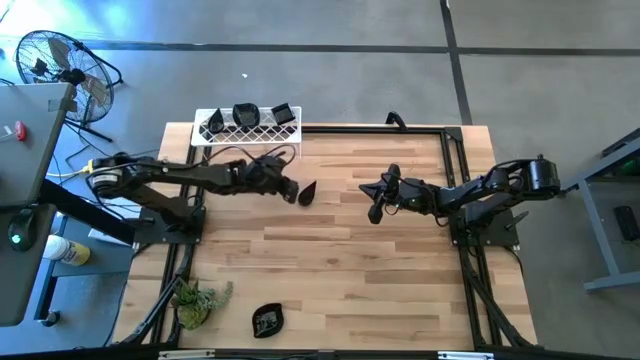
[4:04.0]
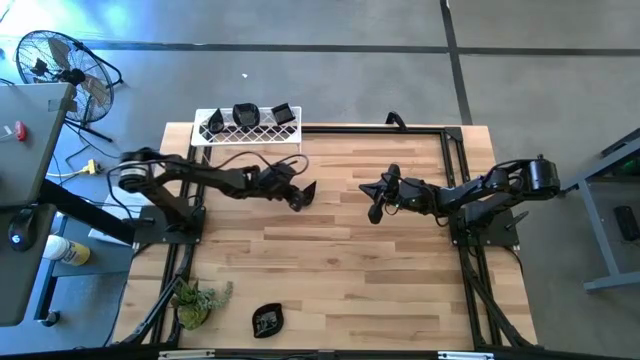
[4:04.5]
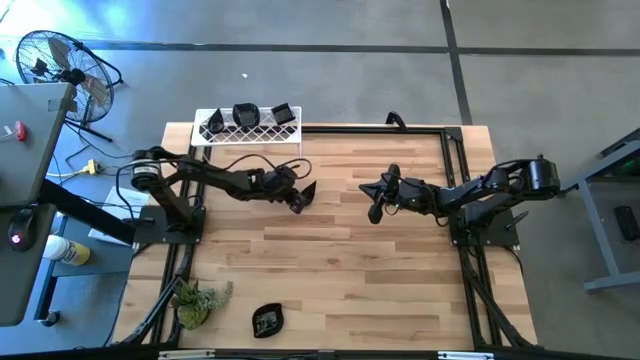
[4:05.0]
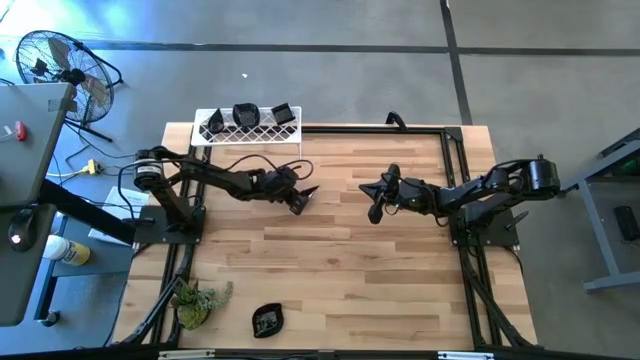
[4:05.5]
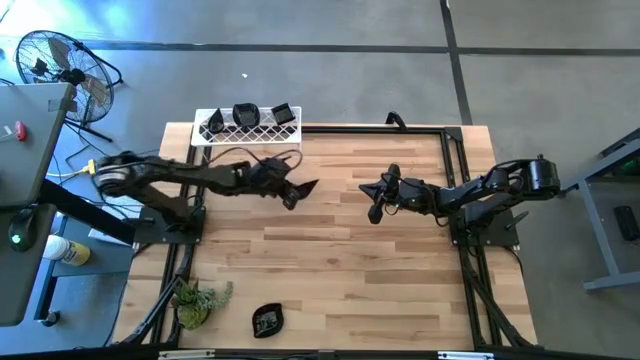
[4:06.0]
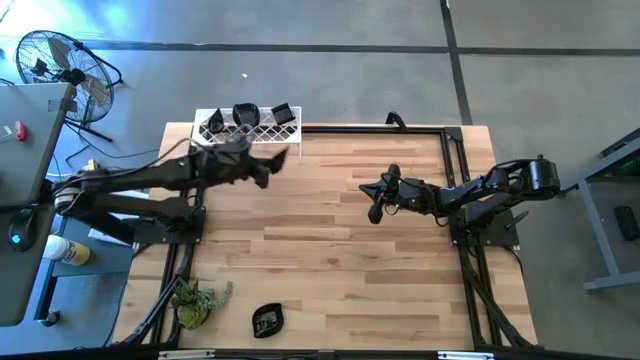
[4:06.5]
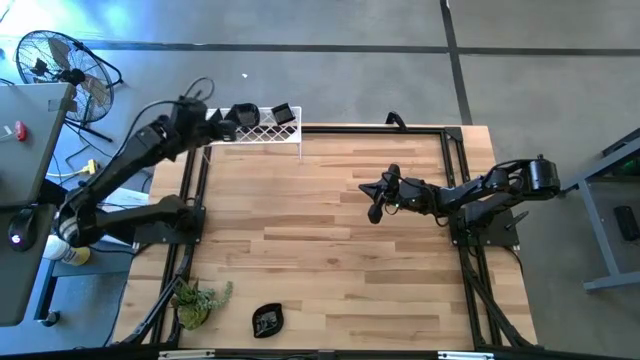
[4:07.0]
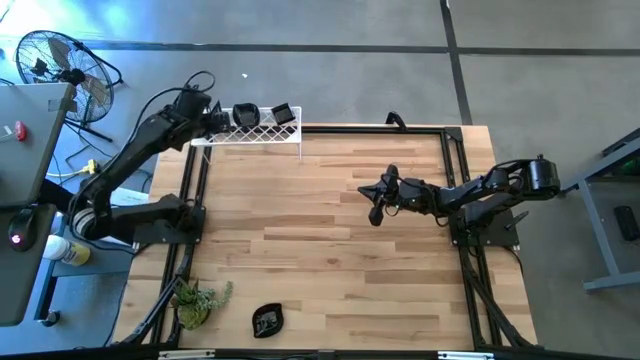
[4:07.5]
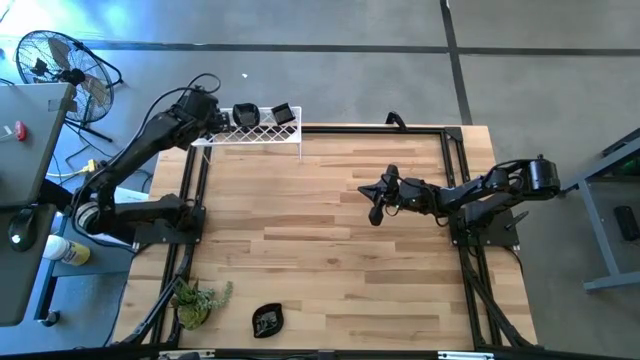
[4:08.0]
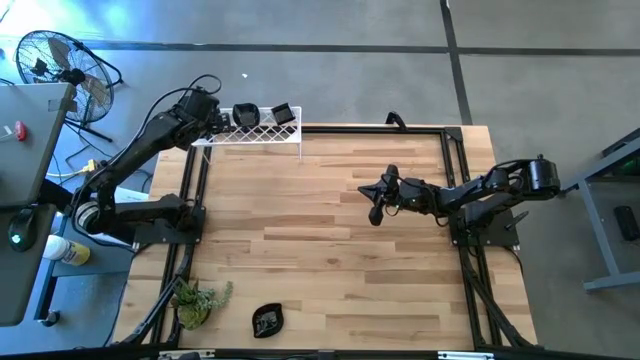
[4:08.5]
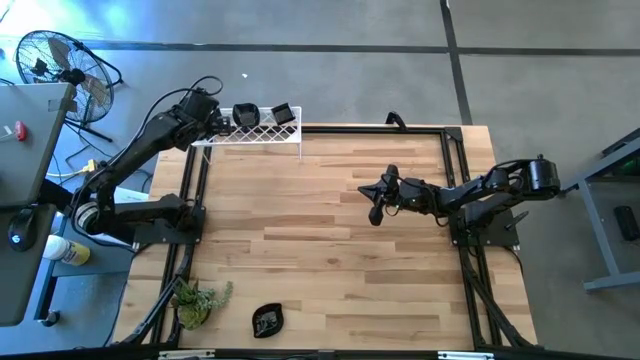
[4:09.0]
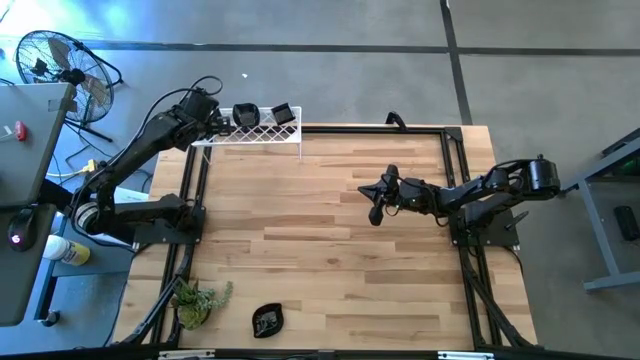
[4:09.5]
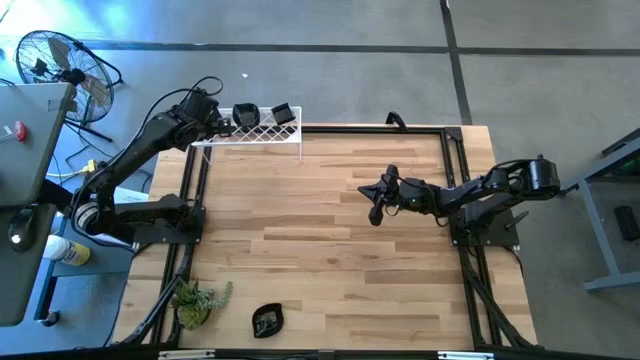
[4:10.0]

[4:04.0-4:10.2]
Task: Pick & Place Mini shaped plates
Stack the drop-shaped plate on top of the drop-shaped plates on the shelf

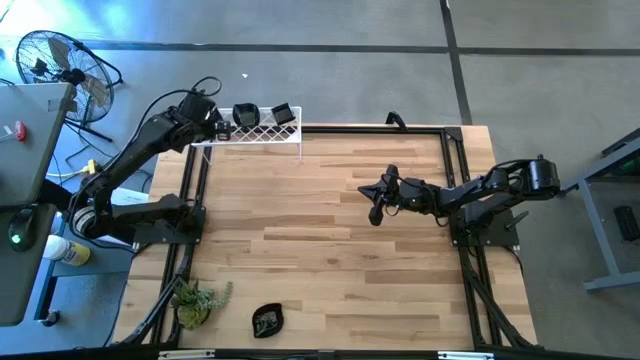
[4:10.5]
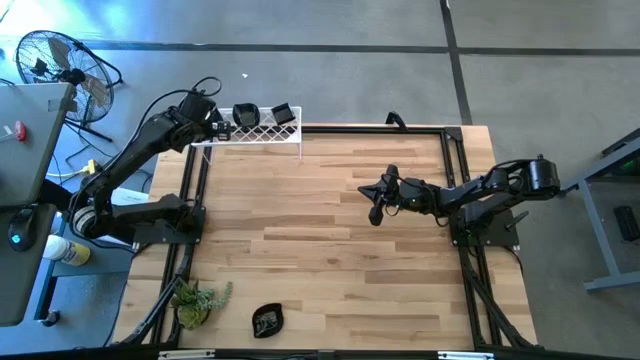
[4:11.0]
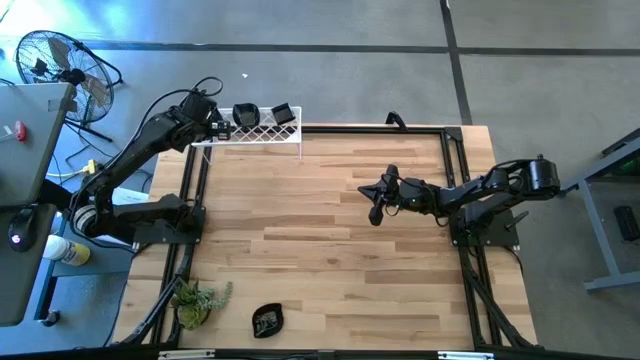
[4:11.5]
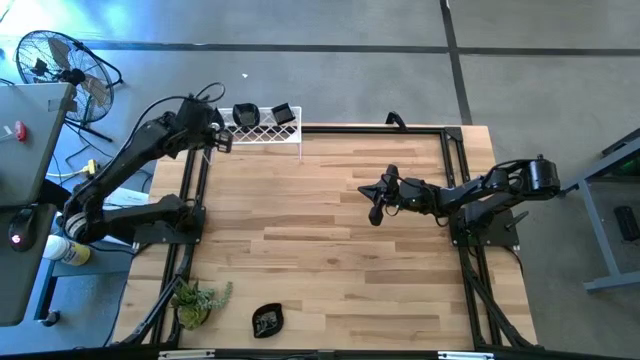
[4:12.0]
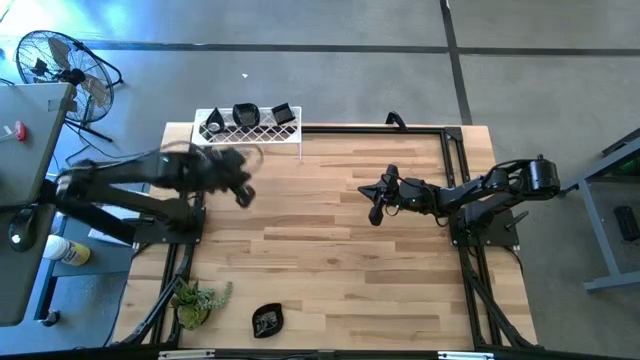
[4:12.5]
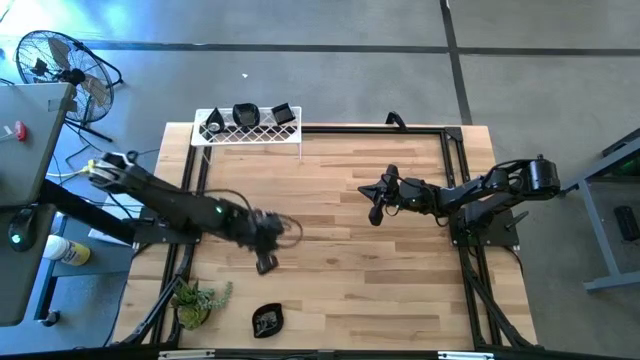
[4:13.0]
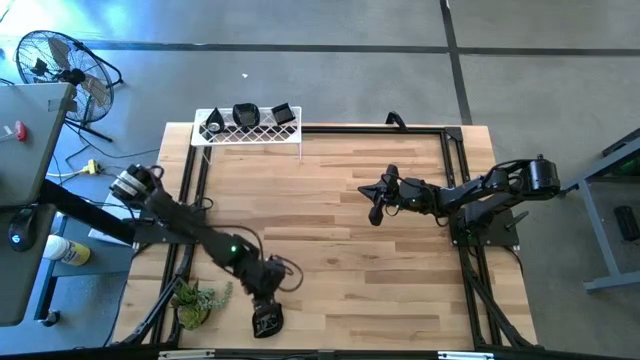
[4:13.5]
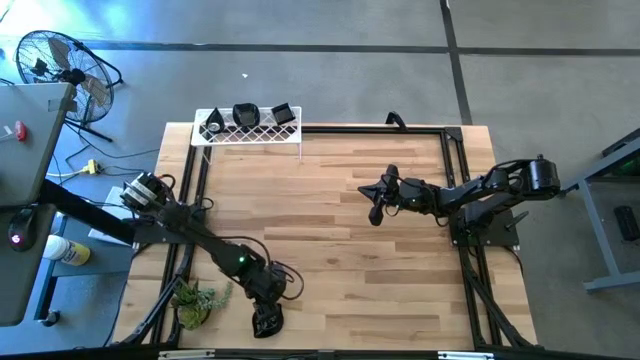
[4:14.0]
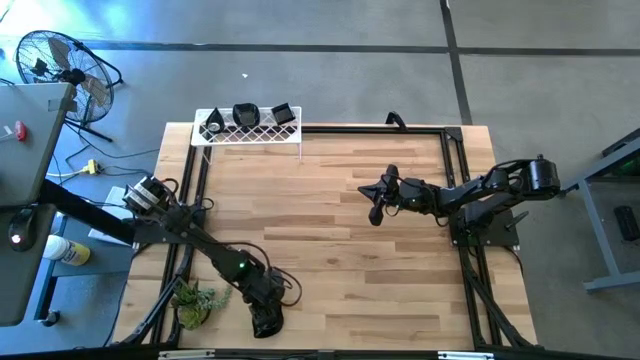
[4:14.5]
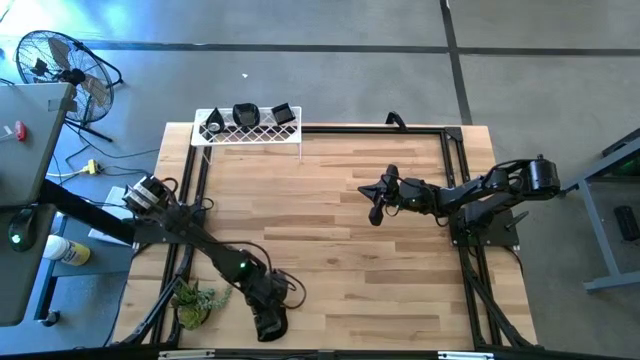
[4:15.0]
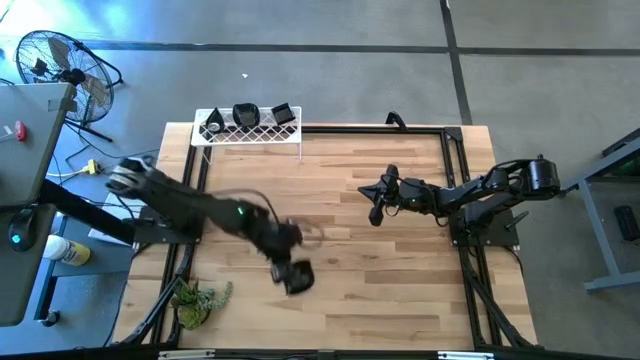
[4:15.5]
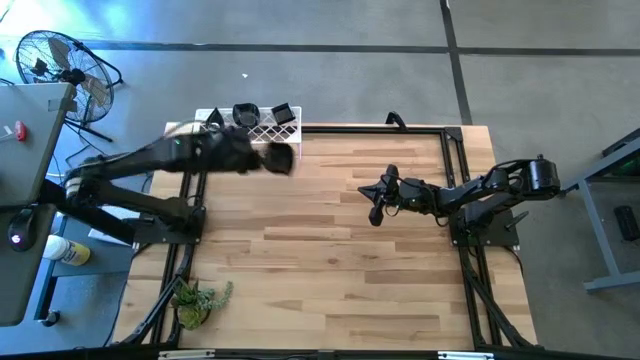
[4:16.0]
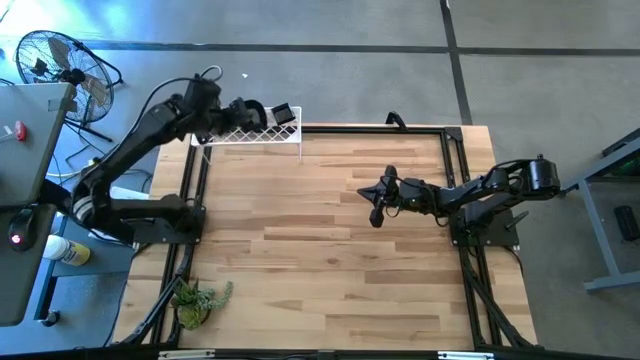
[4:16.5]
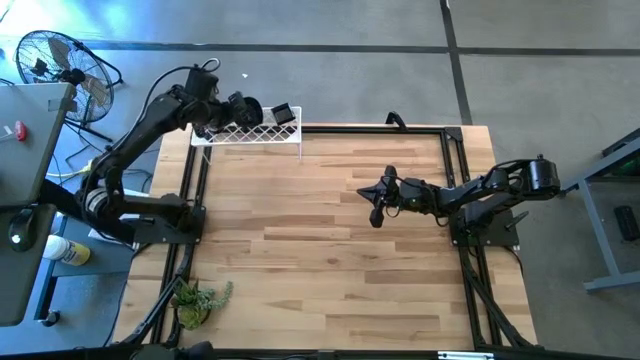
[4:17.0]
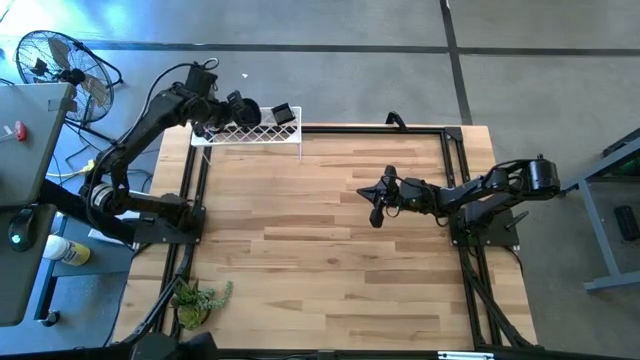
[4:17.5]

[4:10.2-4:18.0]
Stack the leaf-shaped plate on top of the leaf-shaped plates on the shelf

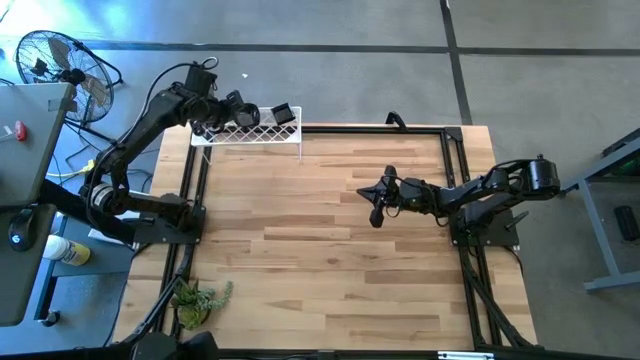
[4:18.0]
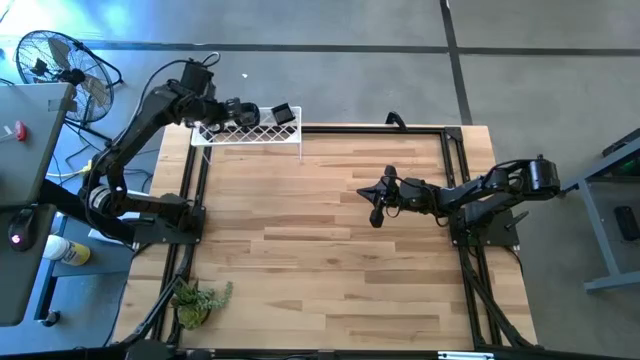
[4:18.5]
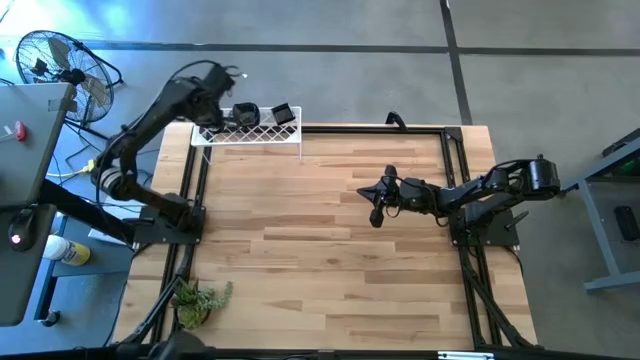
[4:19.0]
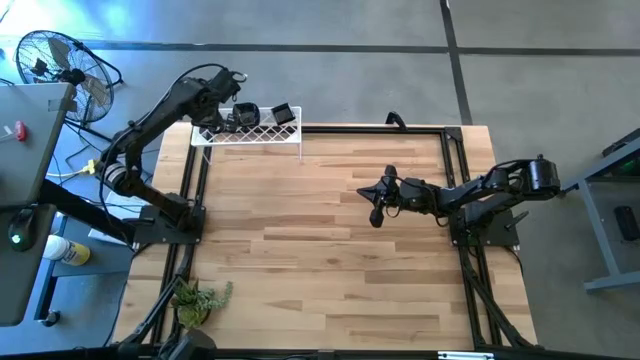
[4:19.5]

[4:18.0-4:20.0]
Adjust the stacked drop-shaped plates

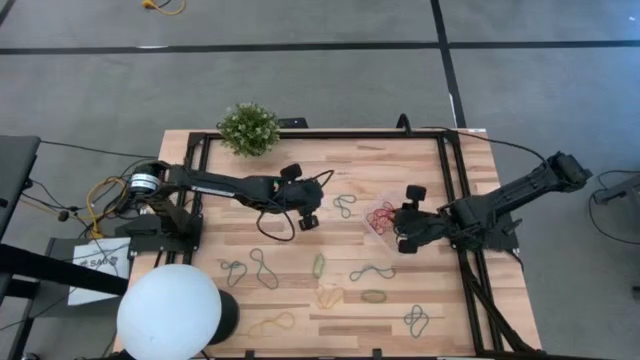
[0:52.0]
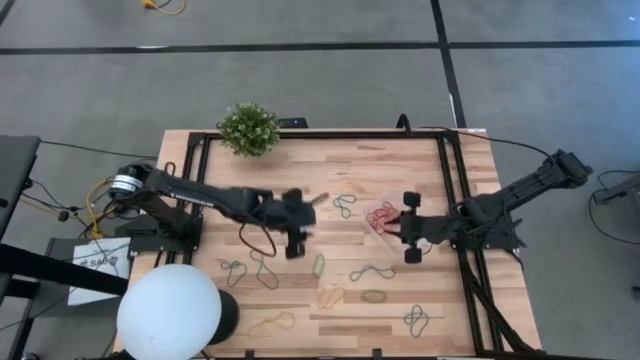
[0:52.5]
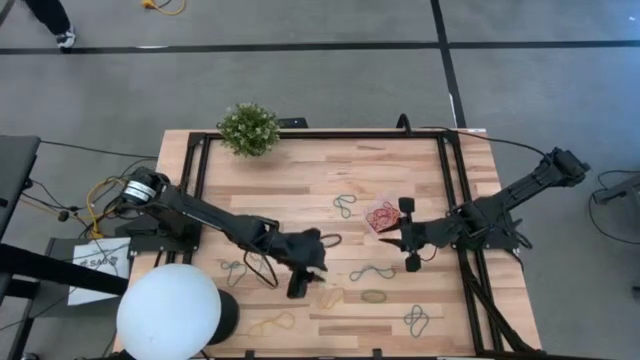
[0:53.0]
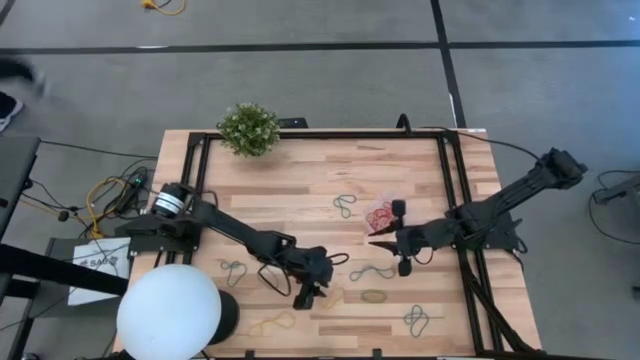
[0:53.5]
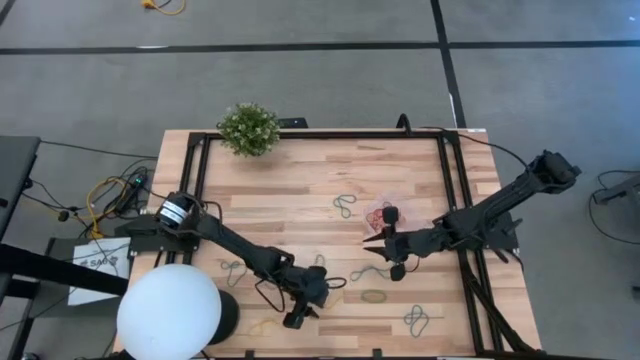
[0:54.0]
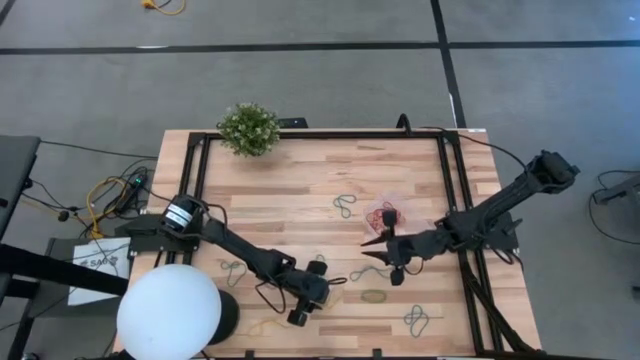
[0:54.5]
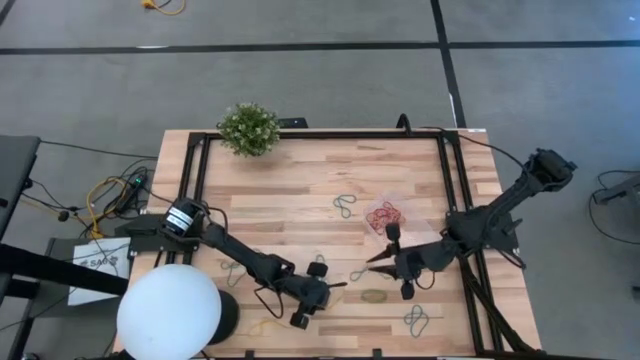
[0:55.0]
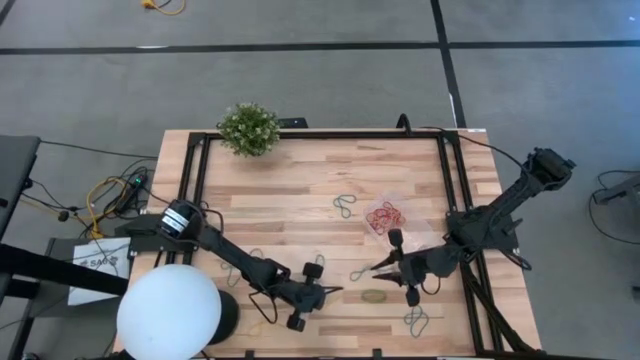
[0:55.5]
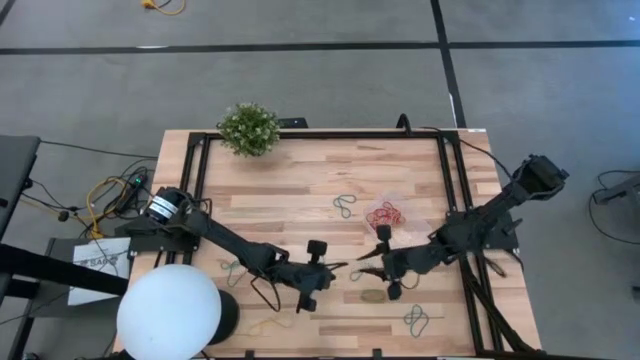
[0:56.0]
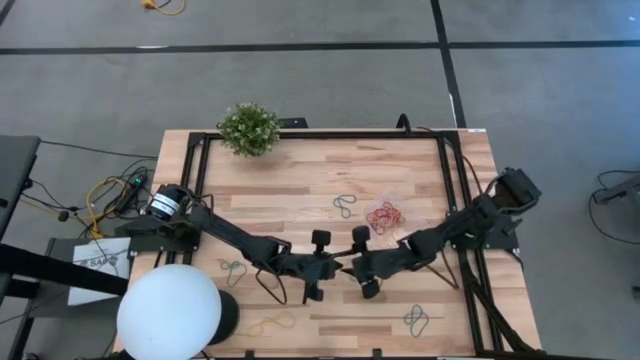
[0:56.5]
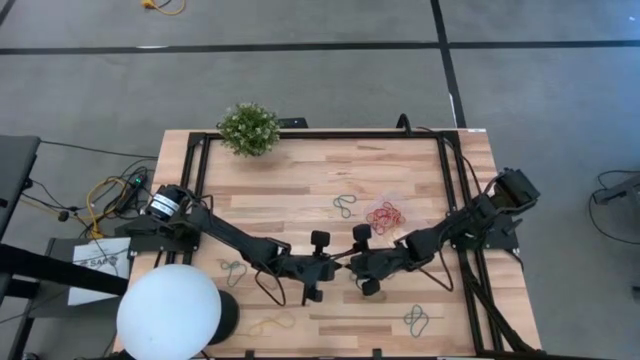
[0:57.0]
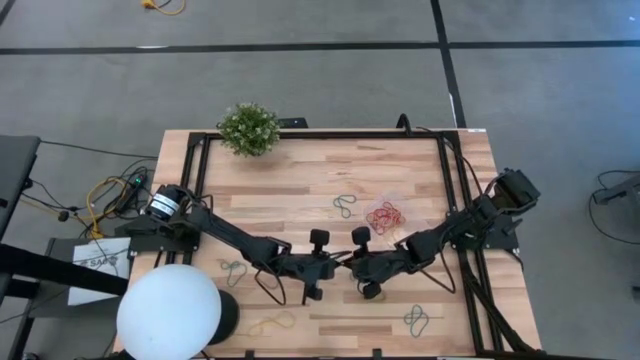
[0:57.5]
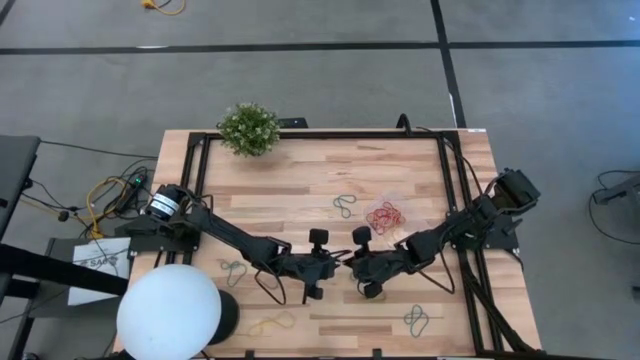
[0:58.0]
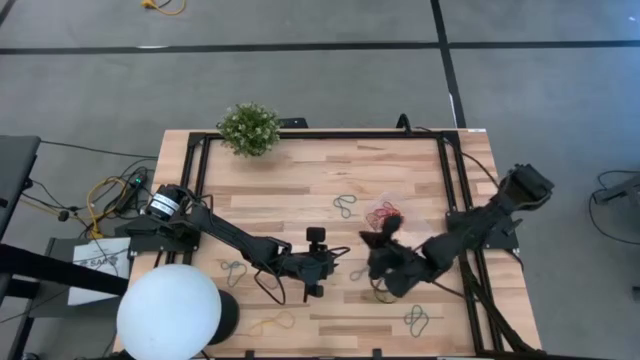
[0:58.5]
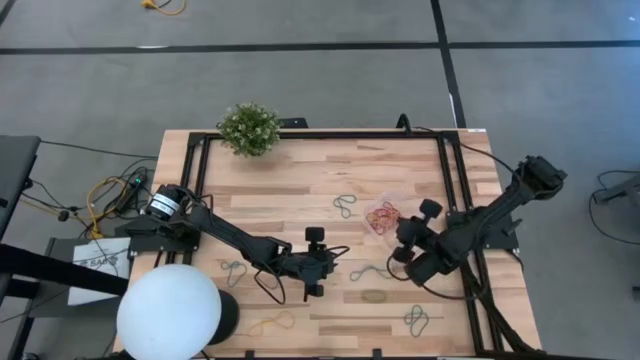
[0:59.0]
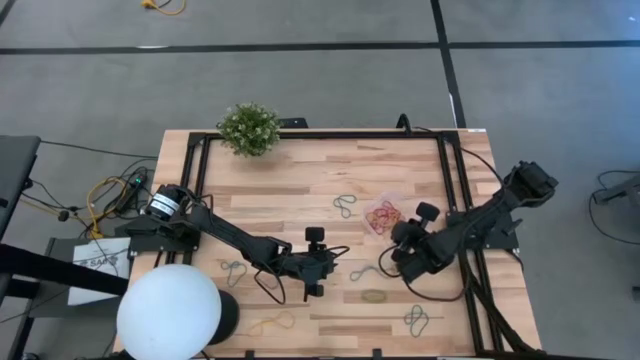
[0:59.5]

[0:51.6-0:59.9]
Task: Pick and place items into bin
Put the yellow rubber band into the transparent bin
